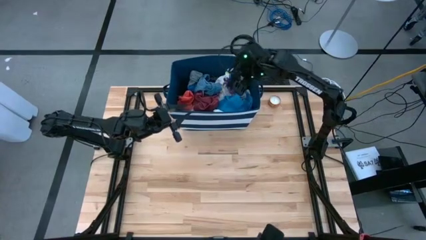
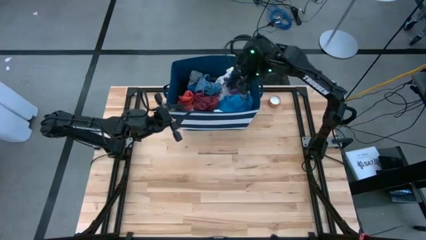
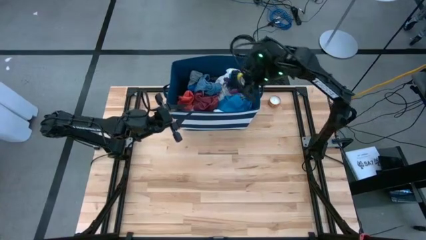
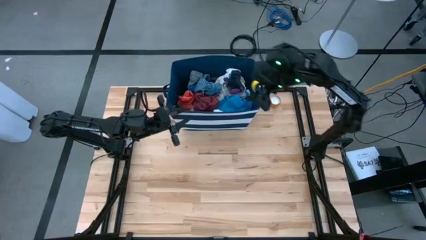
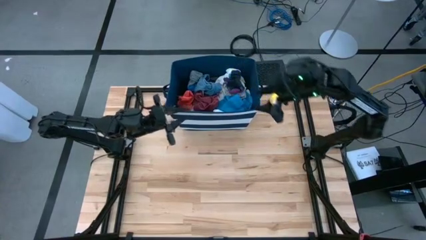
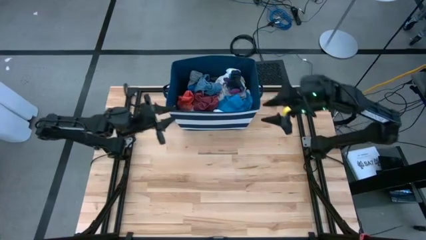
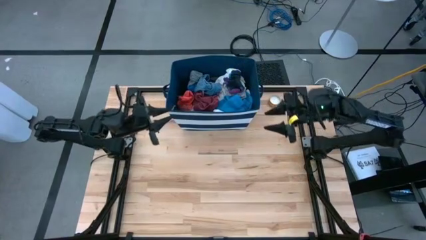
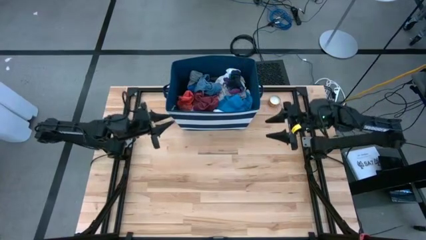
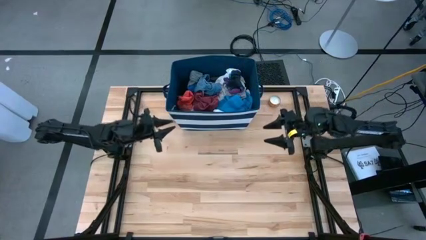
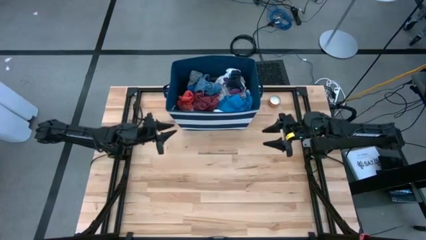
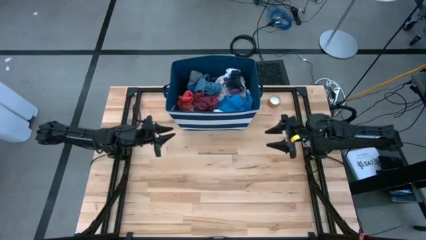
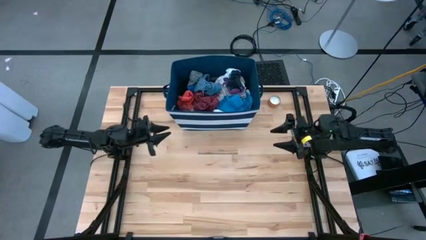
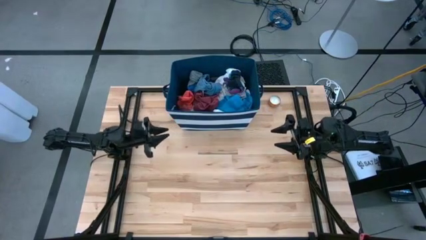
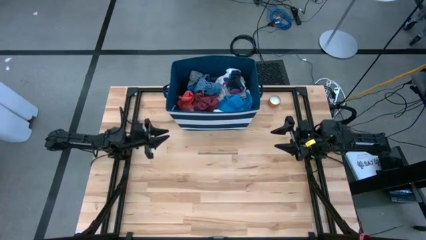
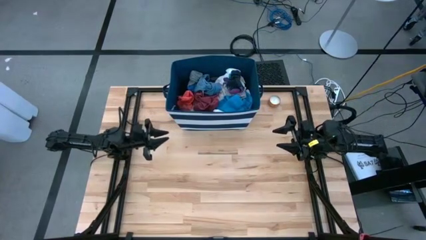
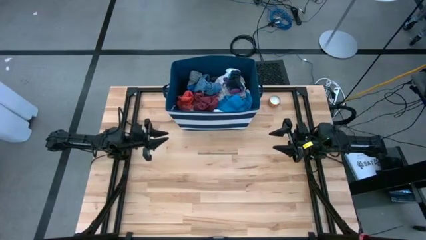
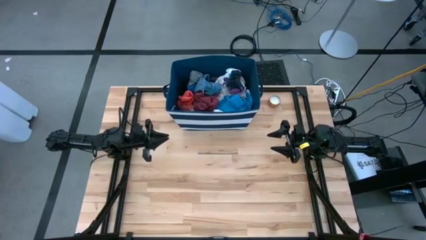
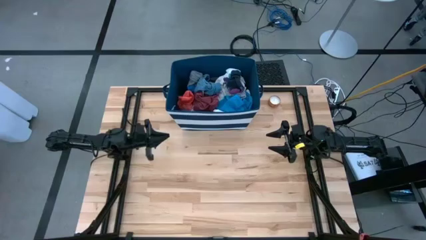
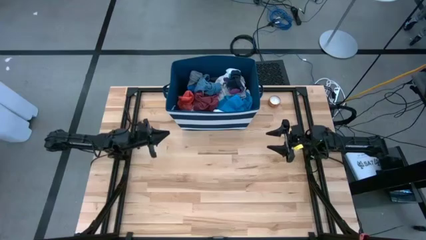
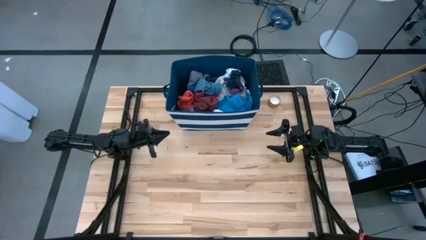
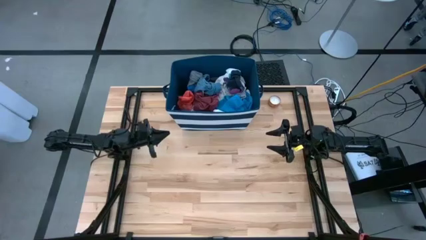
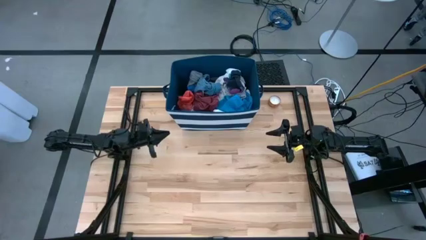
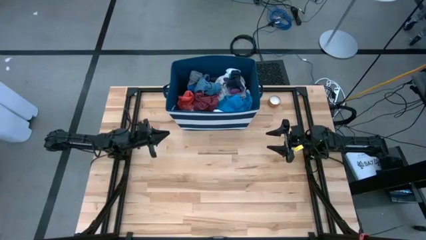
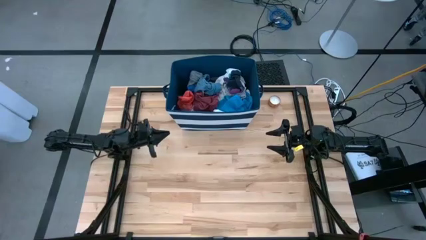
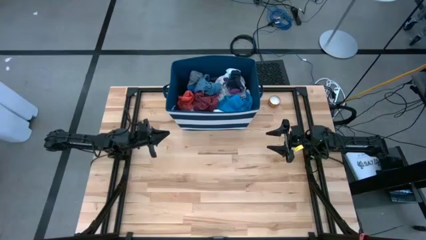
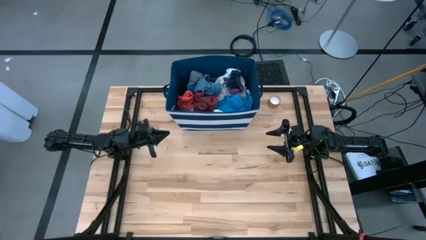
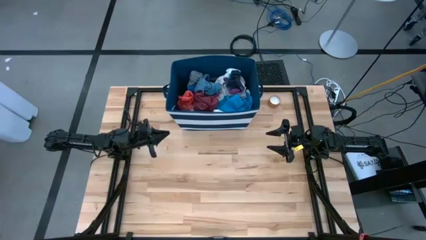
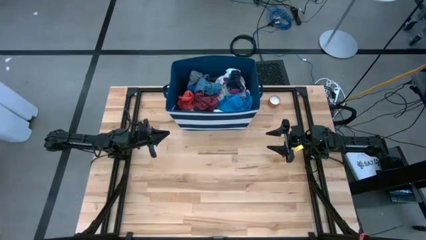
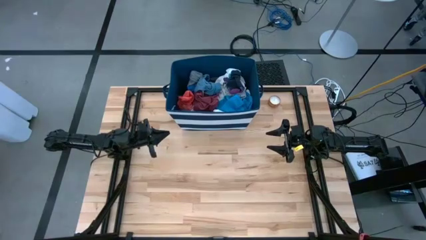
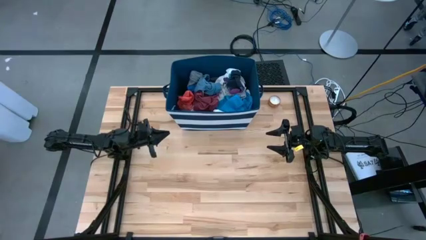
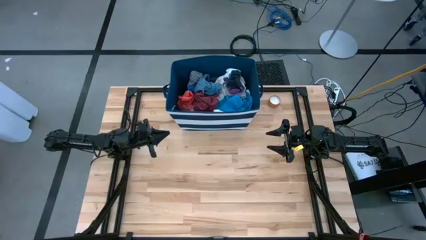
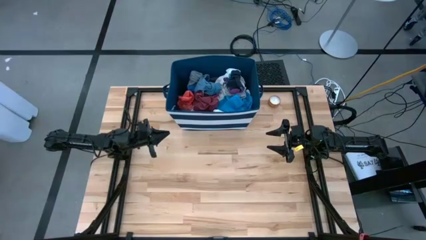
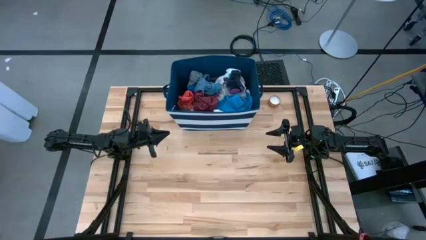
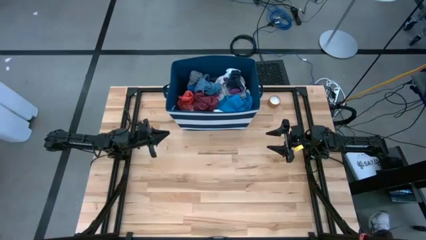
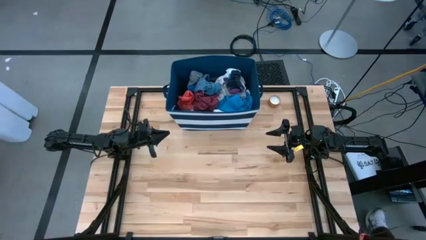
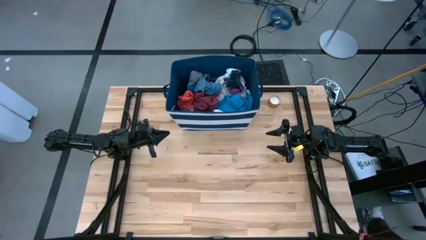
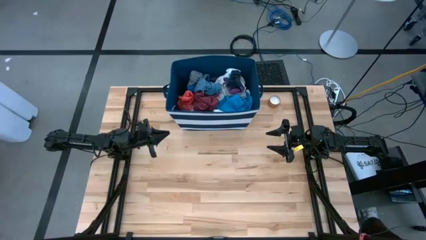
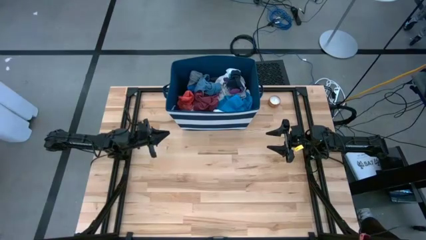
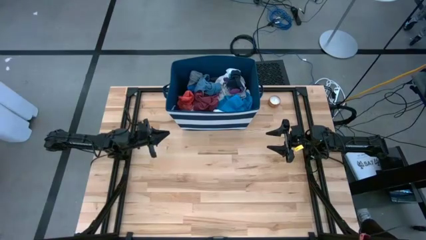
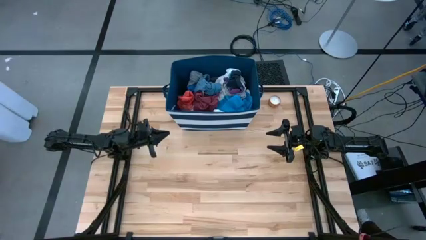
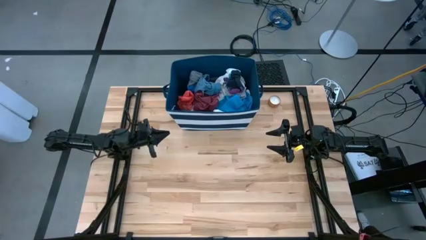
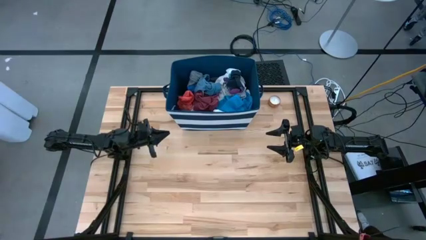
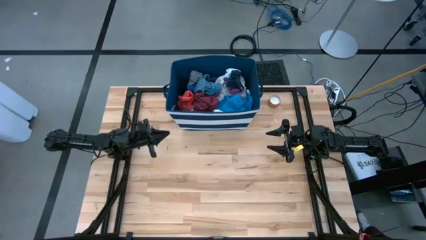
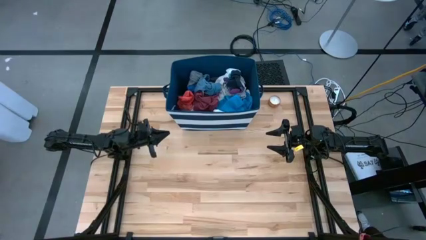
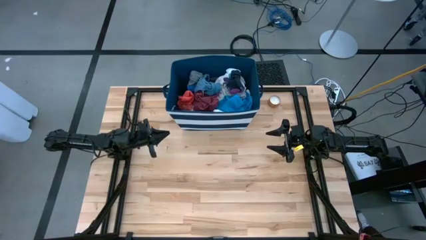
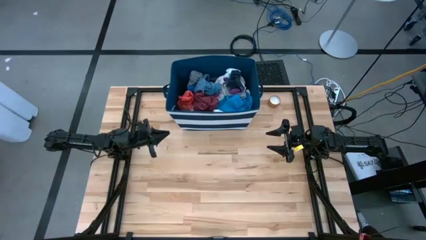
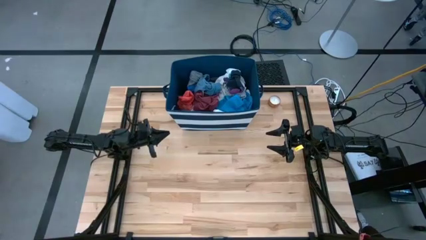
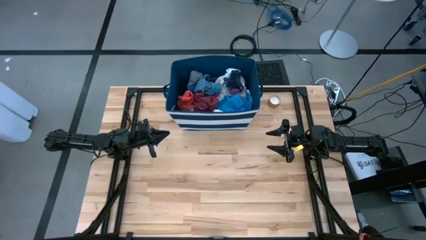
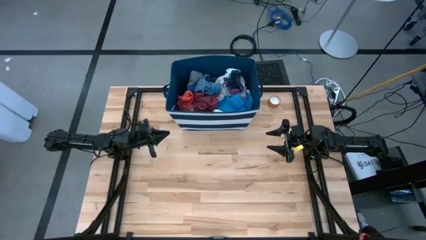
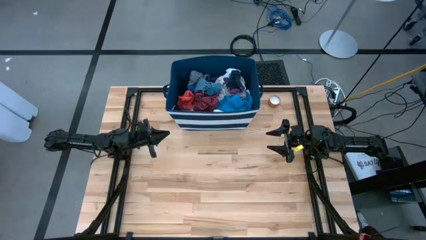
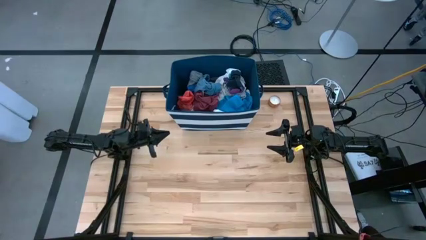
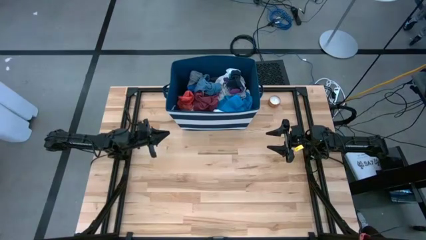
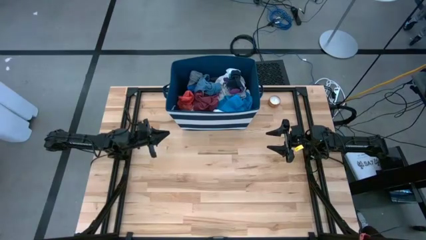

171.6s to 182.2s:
Task: Sort clothes
Return to Home Position
